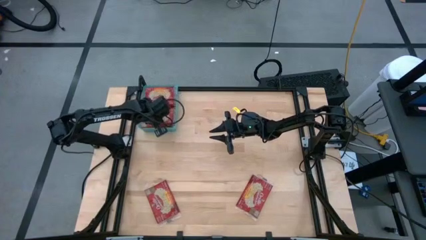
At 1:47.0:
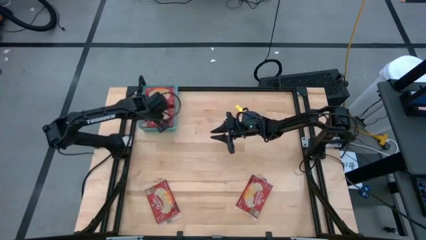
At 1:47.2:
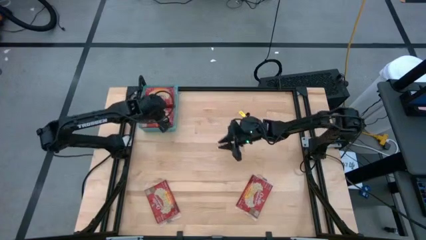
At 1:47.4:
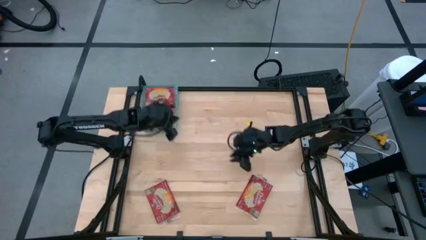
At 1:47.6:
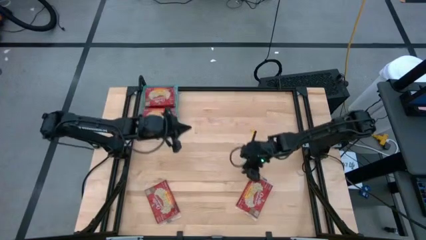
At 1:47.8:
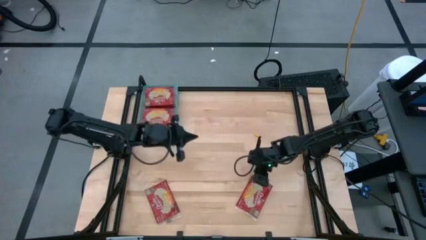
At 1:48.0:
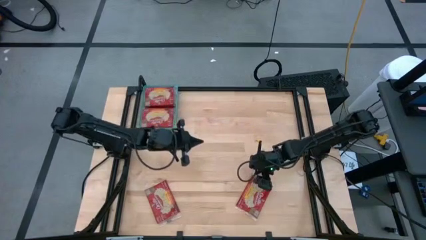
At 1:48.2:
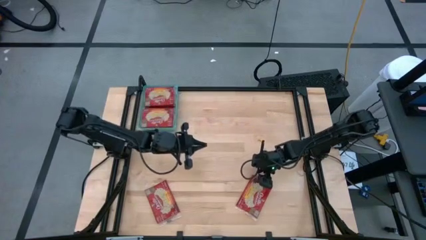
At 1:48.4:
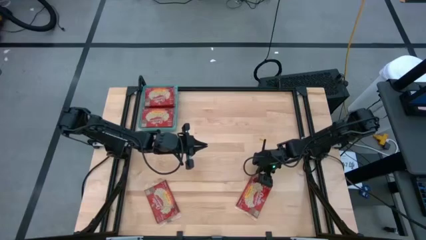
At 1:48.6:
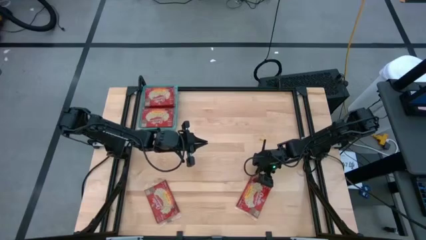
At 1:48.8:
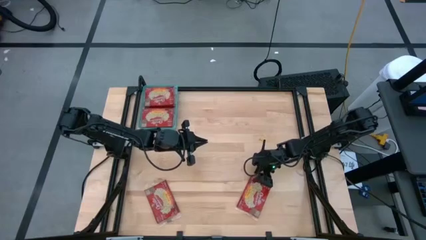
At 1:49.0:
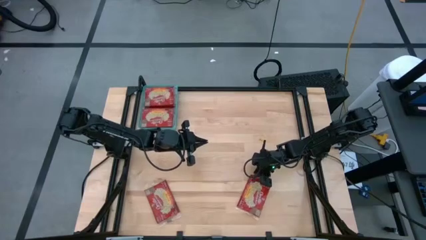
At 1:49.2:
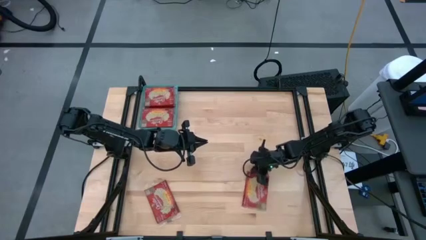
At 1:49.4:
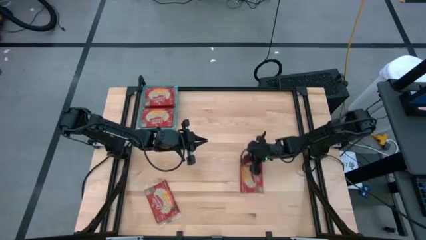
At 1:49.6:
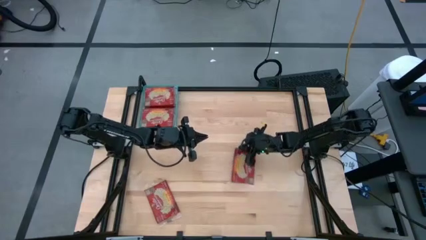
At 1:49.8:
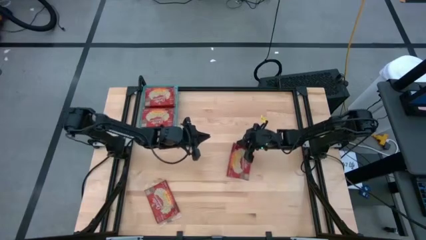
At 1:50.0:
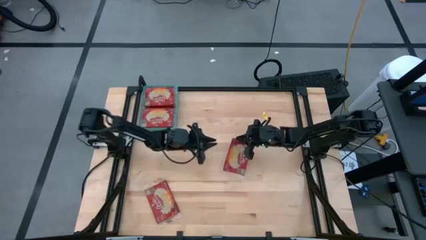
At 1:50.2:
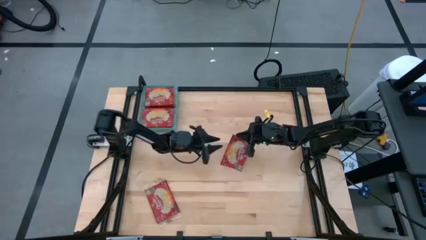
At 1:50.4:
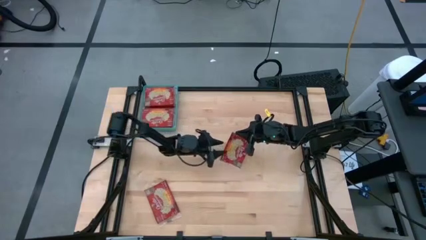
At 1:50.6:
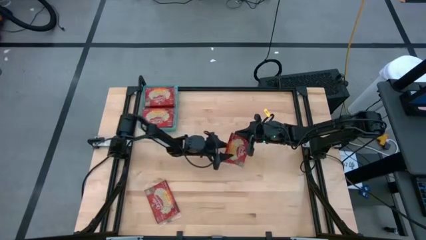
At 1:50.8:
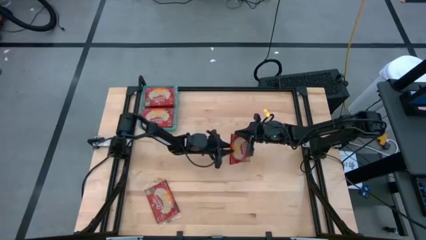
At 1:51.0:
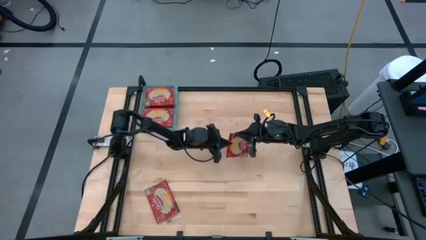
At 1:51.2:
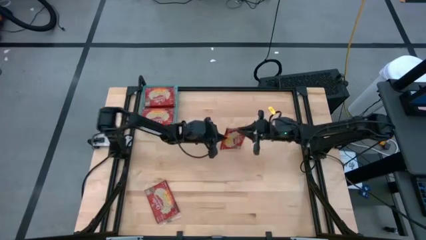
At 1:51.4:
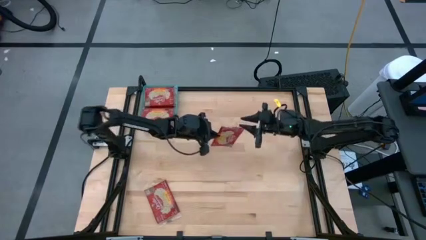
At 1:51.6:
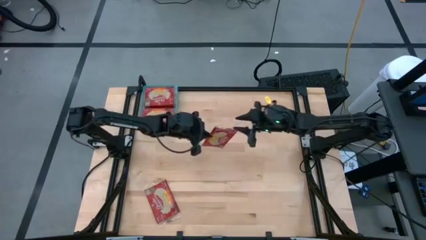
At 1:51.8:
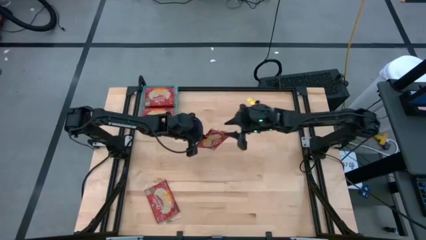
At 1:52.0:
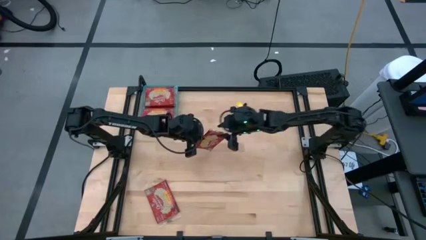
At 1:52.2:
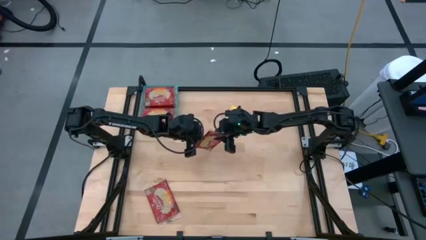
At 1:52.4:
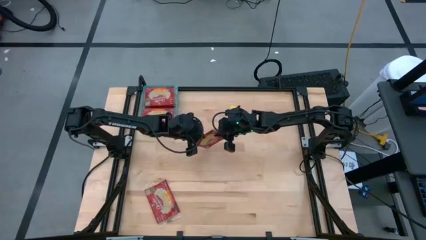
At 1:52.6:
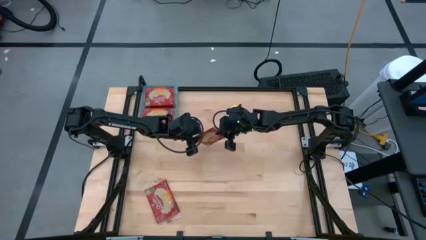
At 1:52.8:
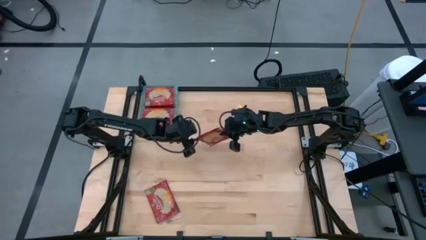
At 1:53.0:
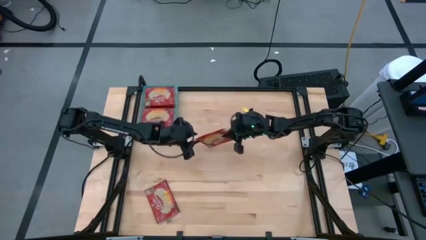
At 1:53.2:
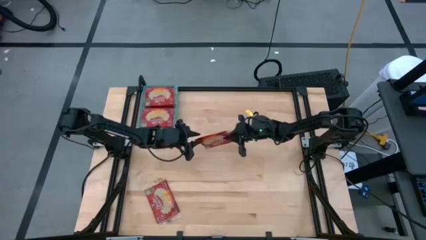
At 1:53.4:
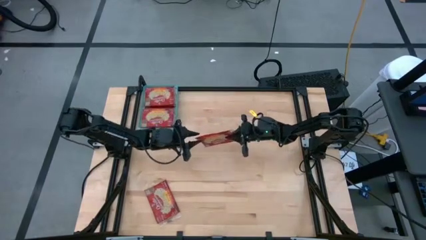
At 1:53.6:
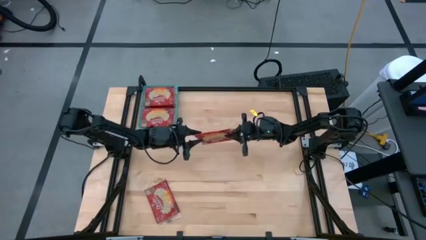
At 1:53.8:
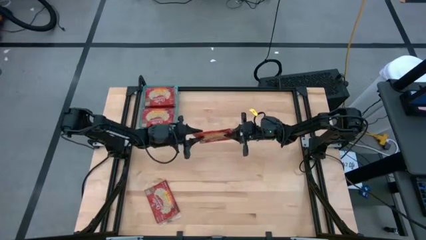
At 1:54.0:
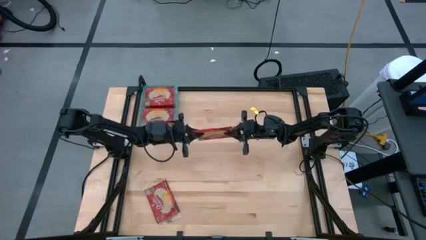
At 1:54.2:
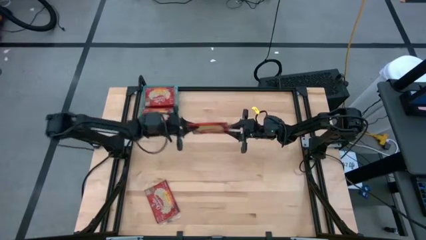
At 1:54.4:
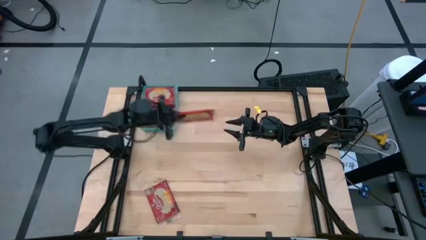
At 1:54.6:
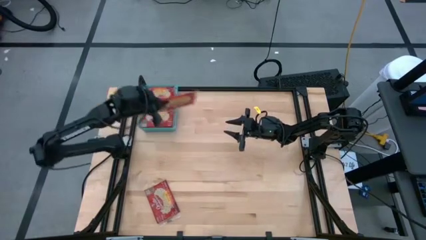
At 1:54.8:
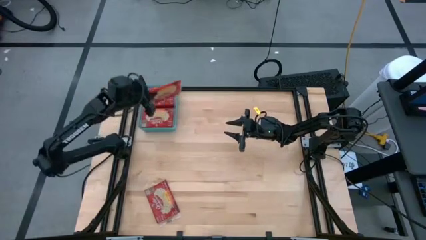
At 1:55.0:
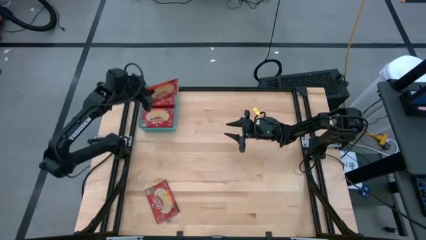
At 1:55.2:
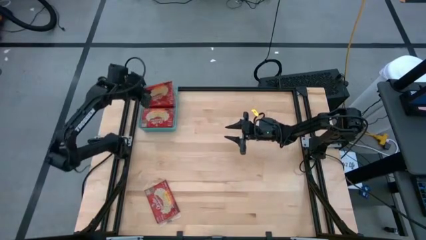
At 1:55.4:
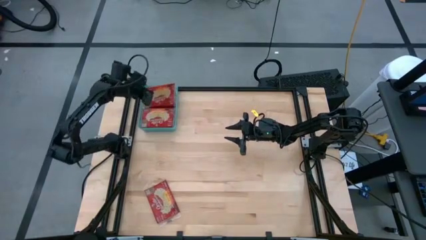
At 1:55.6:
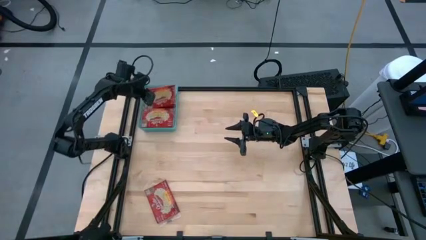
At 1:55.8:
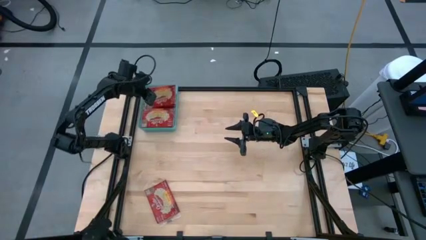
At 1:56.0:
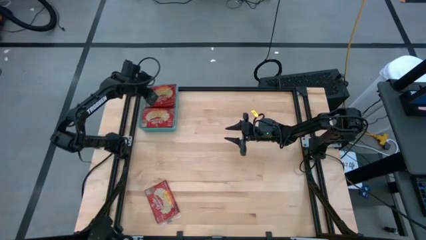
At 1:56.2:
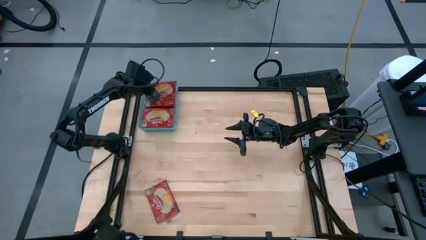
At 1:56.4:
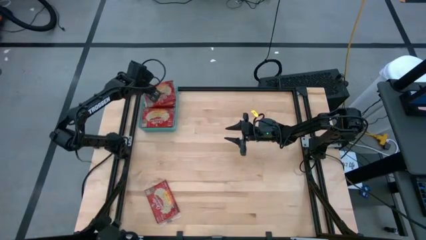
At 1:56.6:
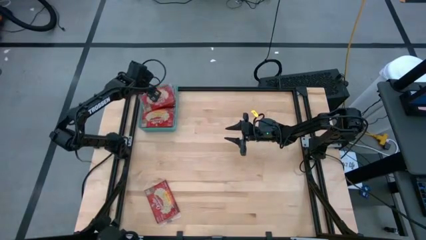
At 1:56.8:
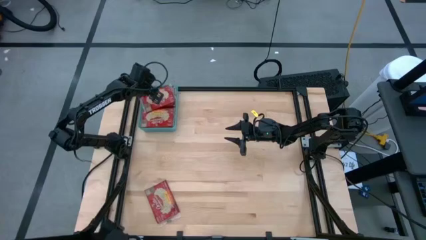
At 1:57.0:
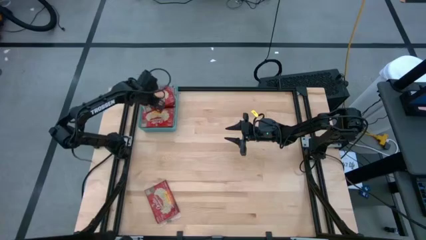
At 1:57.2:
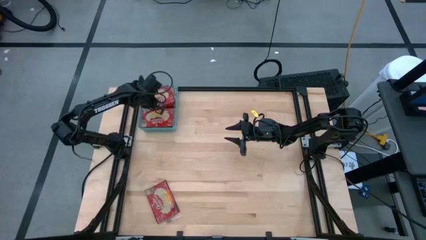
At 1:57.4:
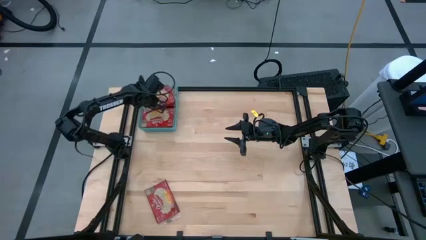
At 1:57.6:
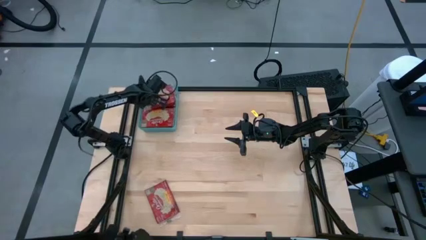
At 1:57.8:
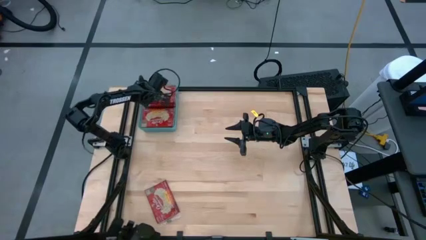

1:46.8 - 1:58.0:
Task: Sort popcorn bags into baskets
Put the popcorn bag into the blue bin
